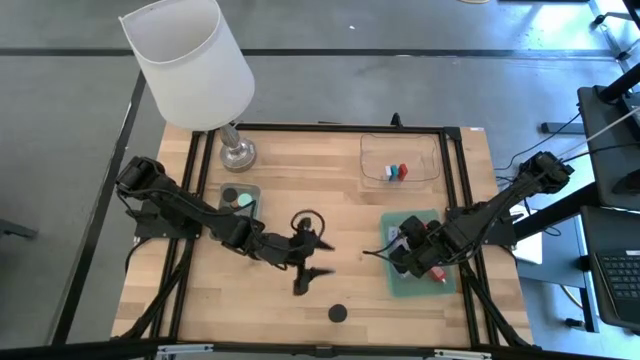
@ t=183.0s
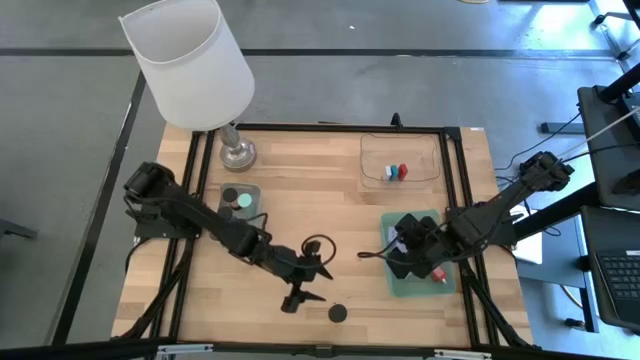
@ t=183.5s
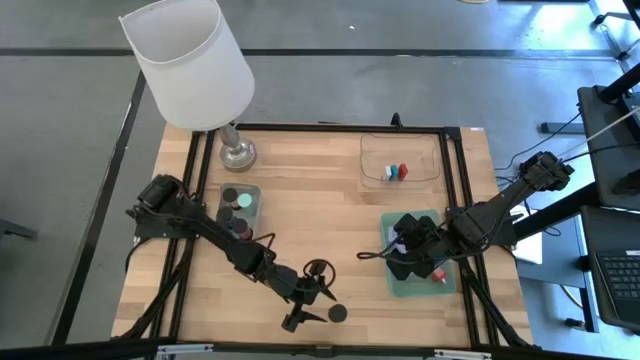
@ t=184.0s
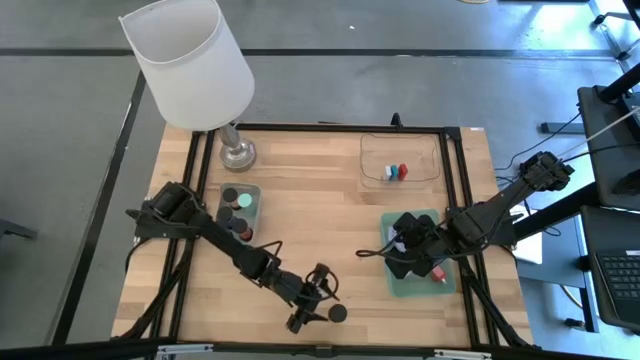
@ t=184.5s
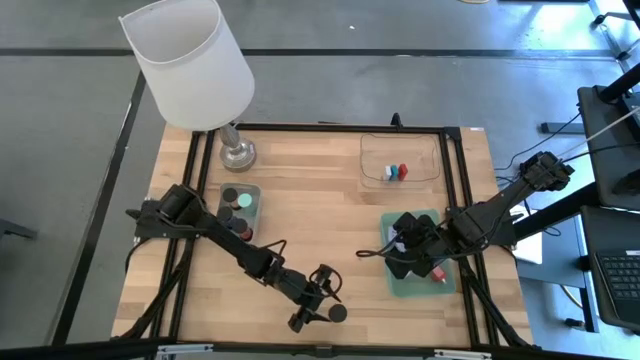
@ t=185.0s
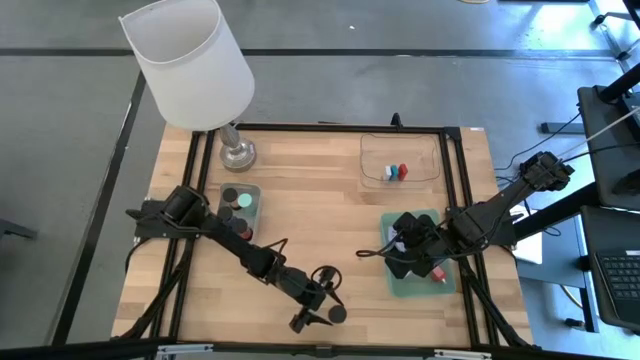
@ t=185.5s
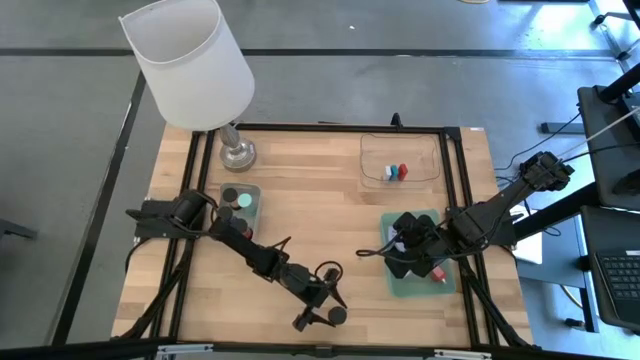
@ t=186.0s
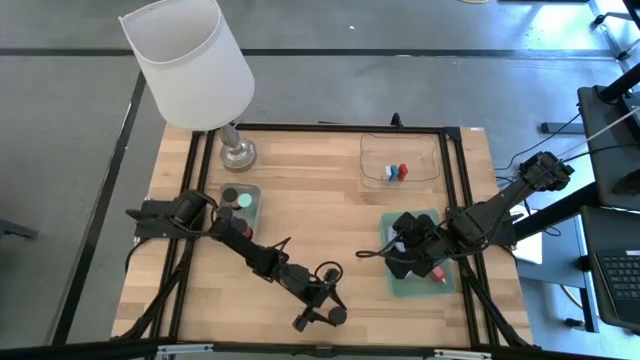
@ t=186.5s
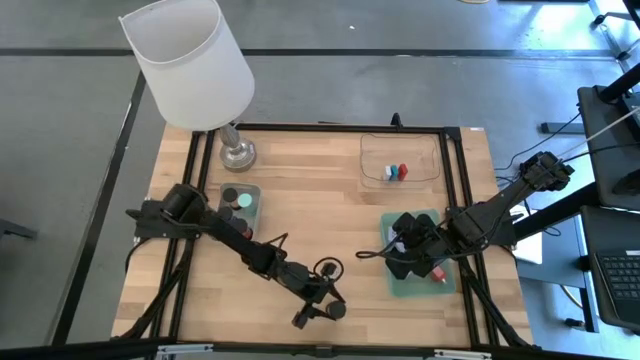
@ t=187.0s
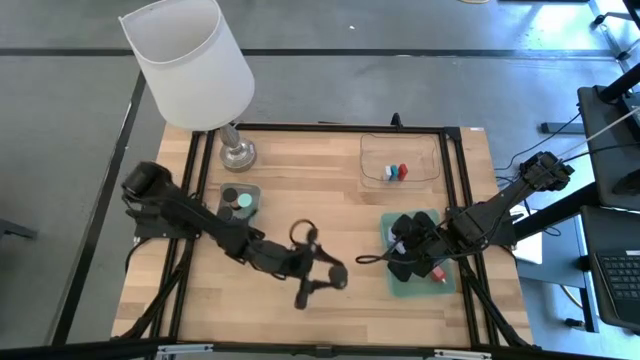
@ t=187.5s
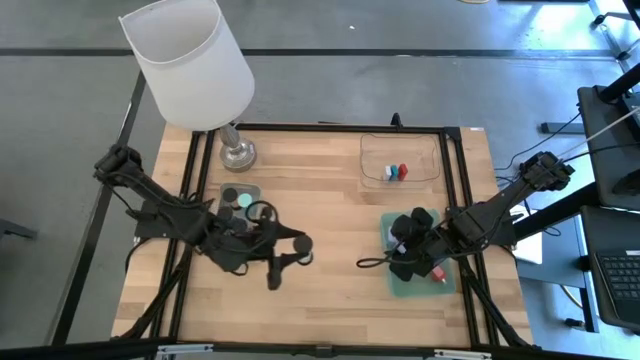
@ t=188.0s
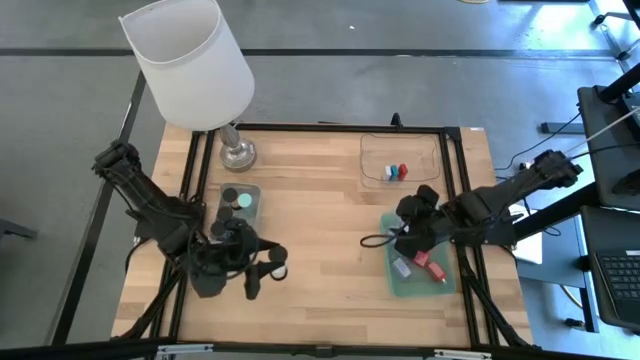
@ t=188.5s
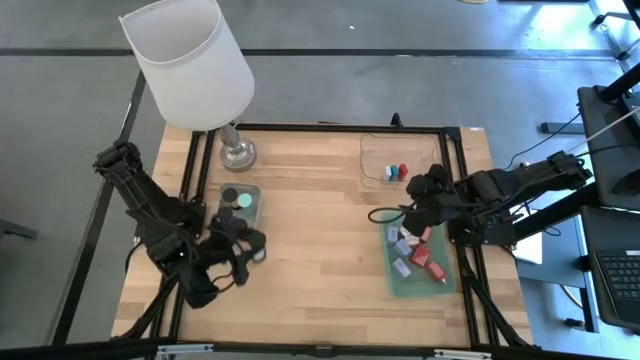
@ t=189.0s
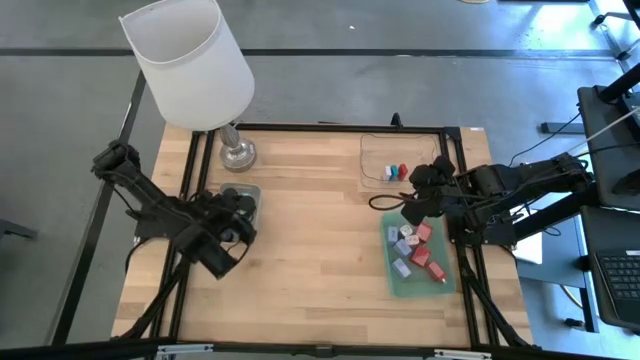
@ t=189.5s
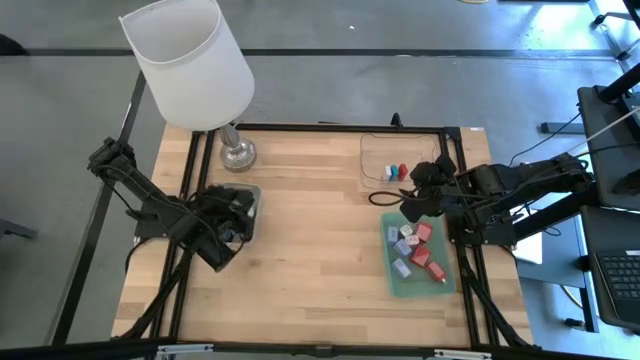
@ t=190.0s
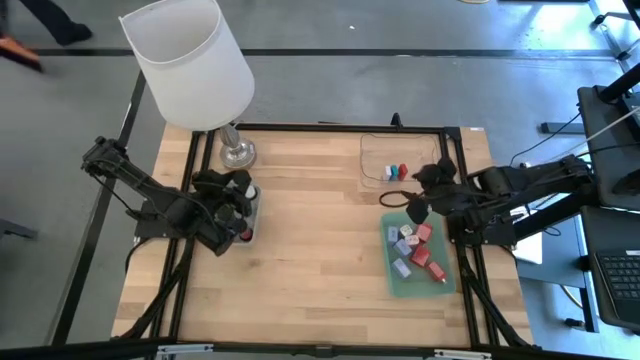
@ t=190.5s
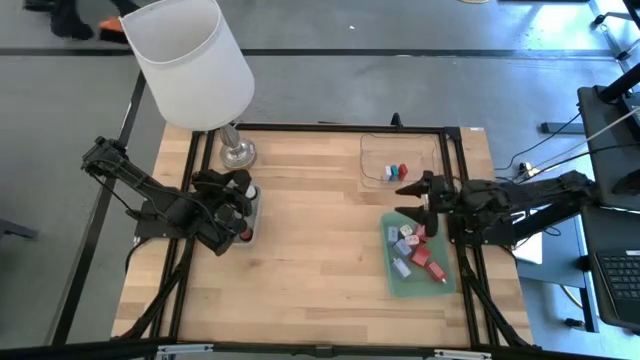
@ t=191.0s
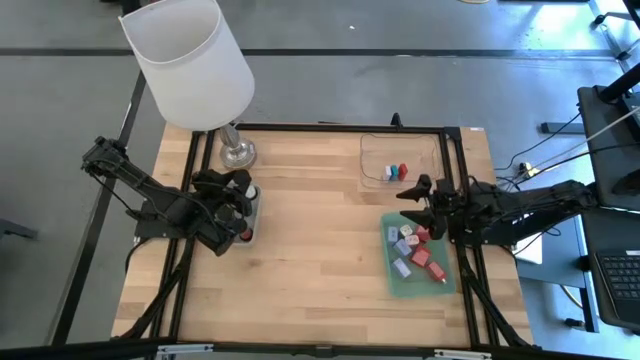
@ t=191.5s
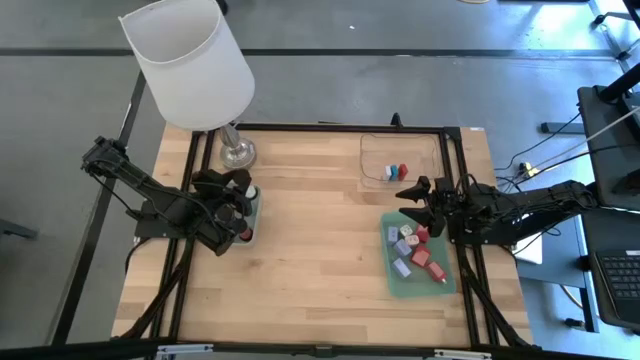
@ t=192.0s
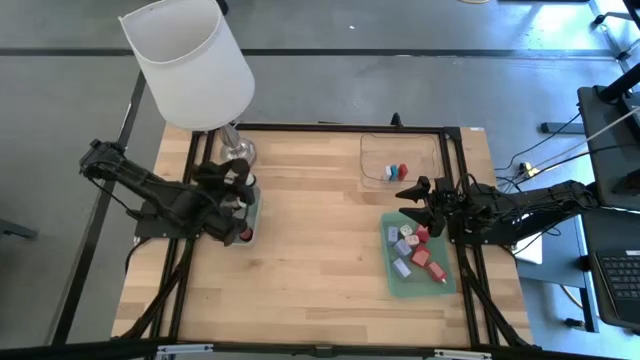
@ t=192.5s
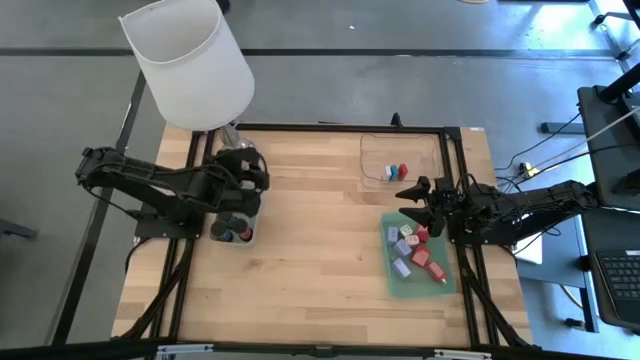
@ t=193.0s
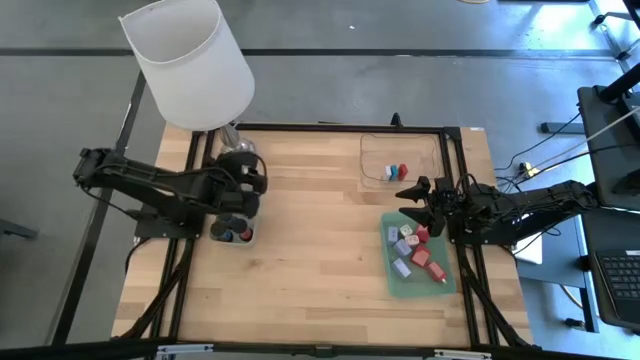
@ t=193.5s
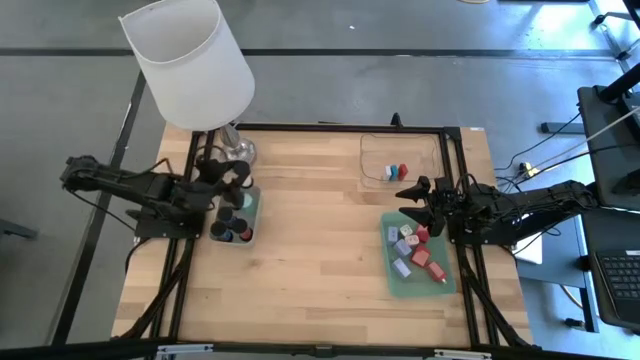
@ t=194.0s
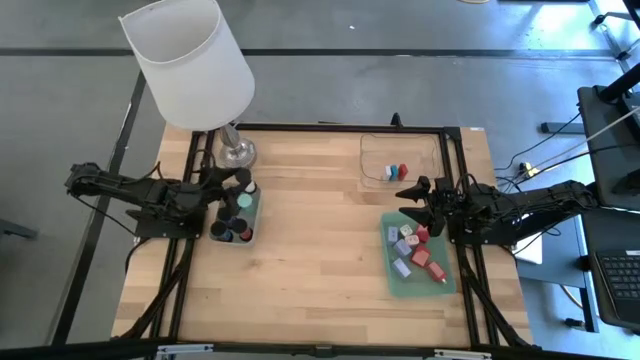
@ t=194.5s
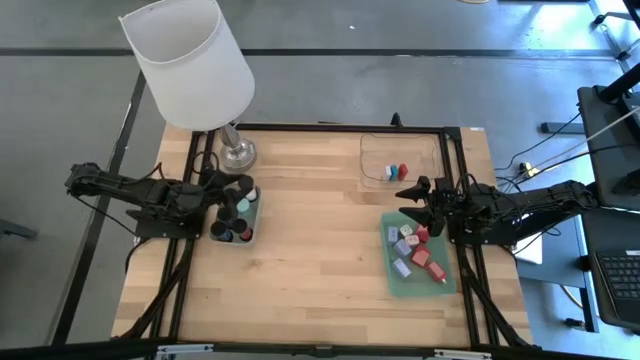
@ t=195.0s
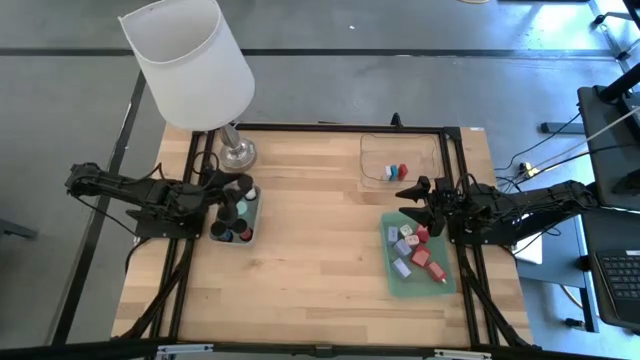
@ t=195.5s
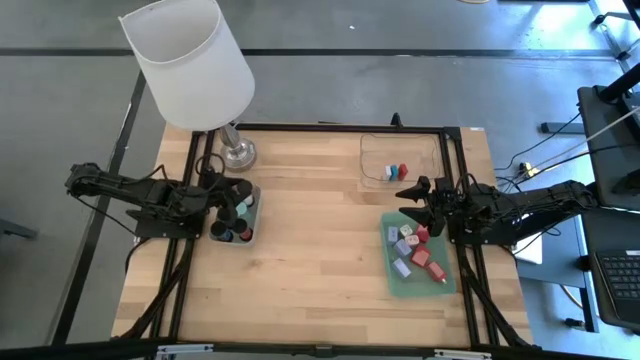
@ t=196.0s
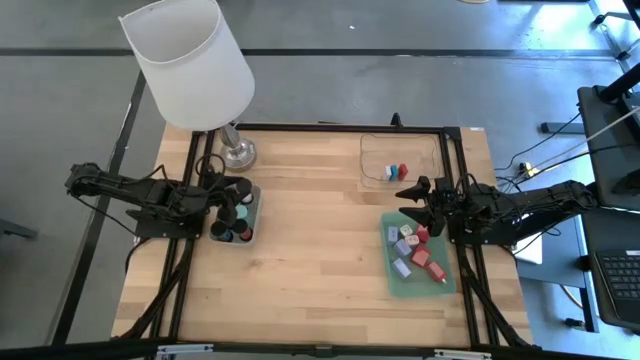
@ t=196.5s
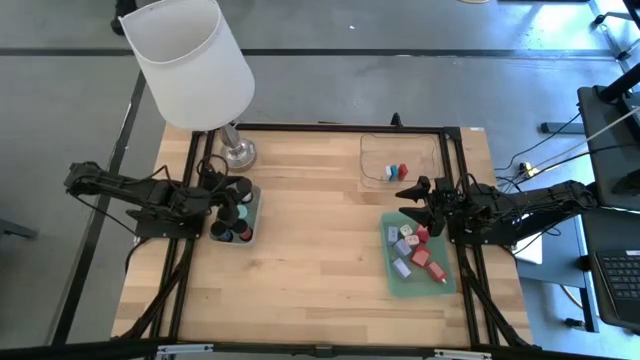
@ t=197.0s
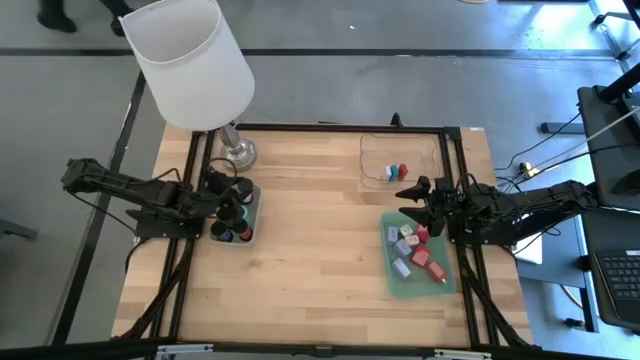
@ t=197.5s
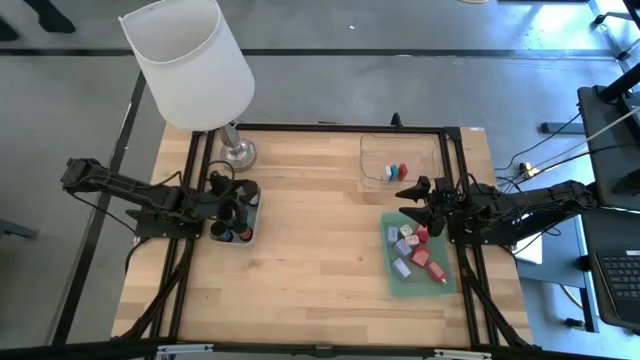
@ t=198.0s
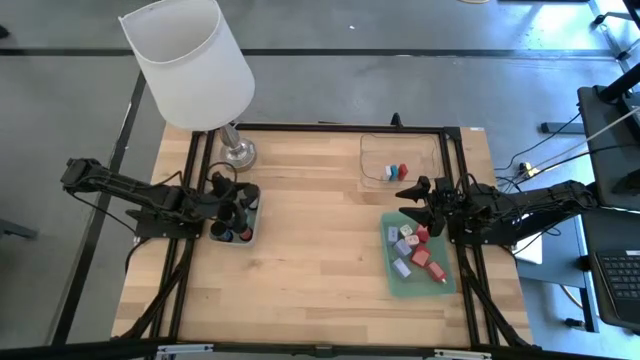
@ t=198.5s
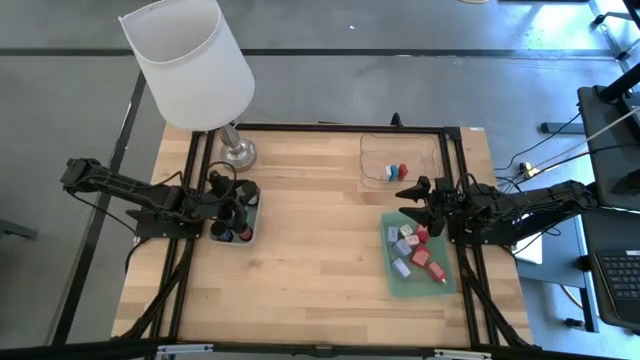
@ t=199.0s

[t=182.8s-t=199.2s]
Task: Pick & Place Office items
Put the white hourglass into the gray bin

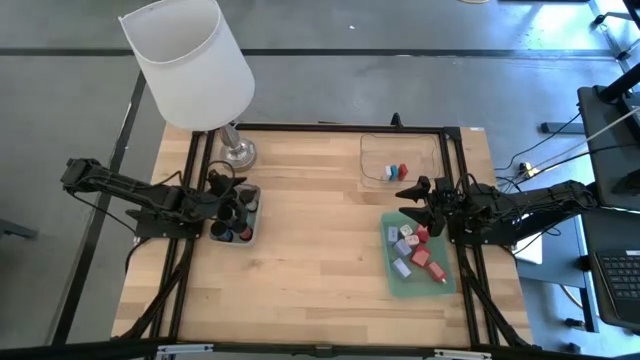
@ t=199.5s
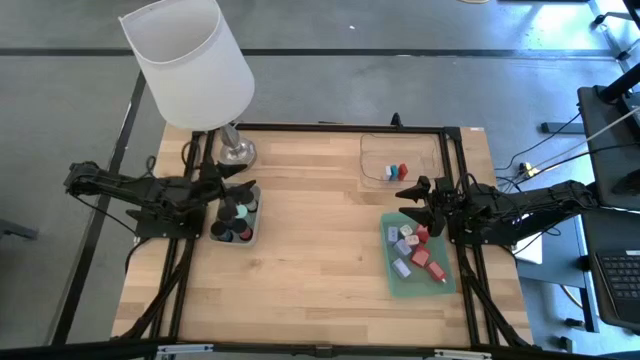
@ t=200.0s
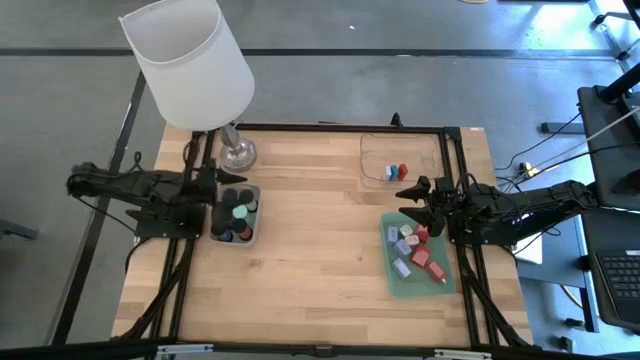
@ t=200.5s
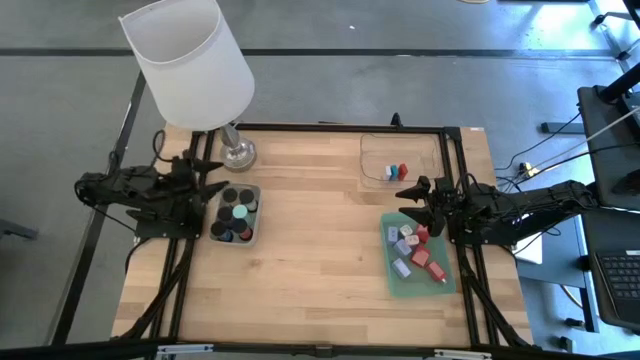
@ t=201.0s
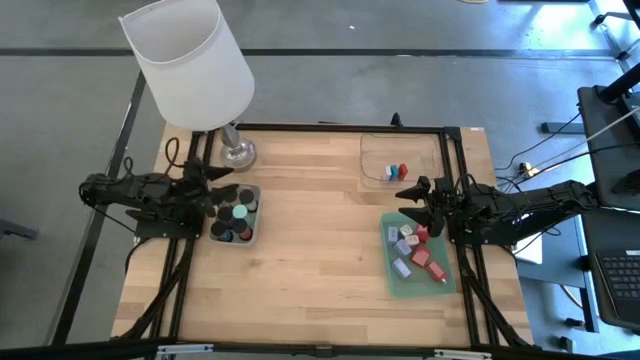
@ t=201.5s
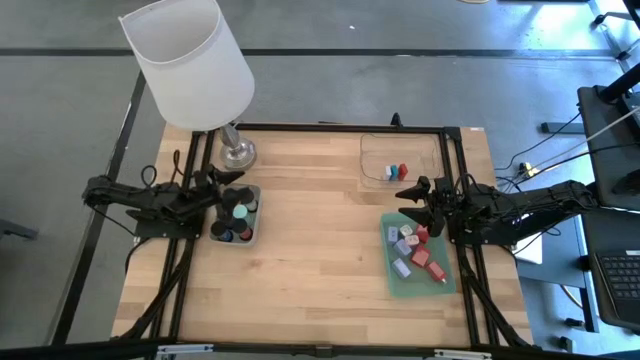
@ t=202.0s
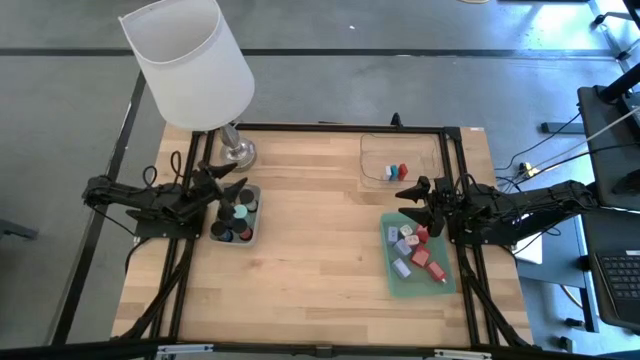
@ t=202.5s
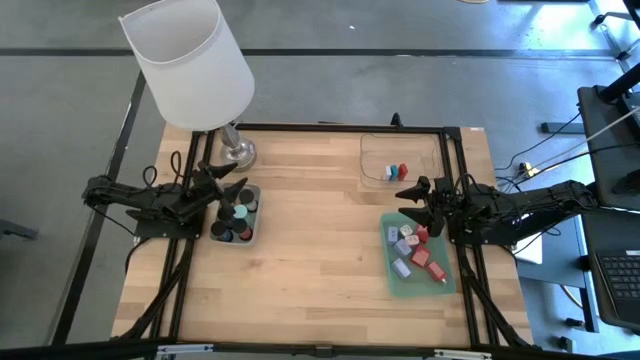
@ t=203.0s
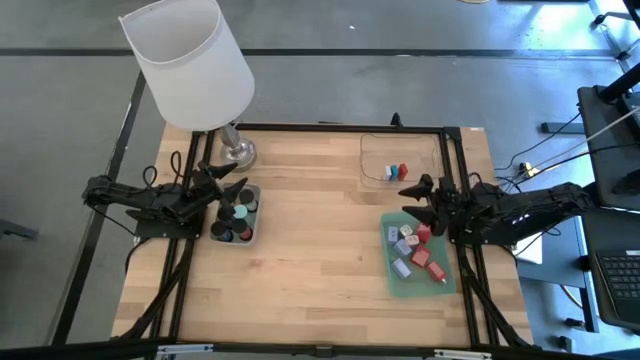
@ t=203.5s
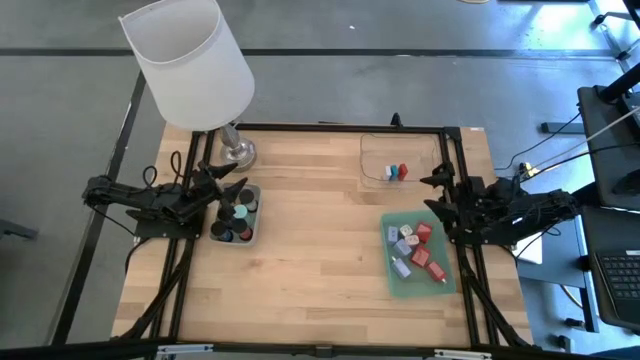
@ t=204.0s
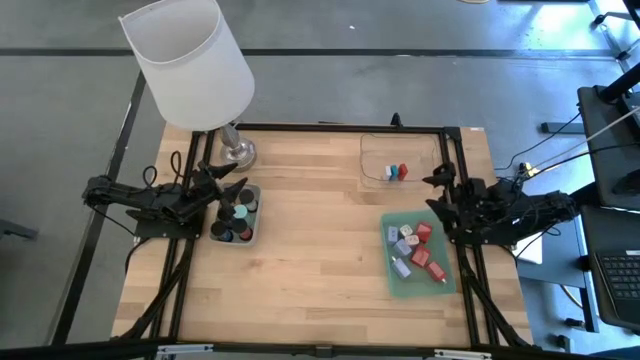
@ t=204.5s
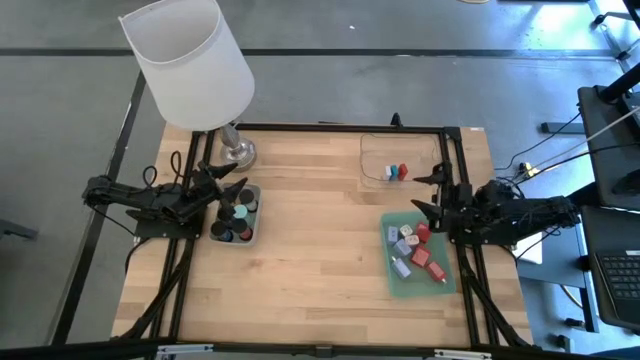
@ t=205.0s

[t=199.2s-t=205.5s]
Return to Home Position
